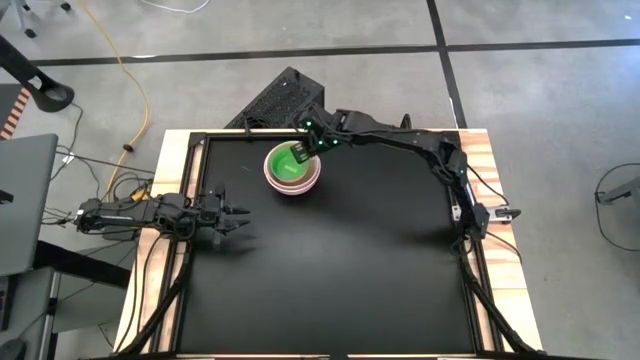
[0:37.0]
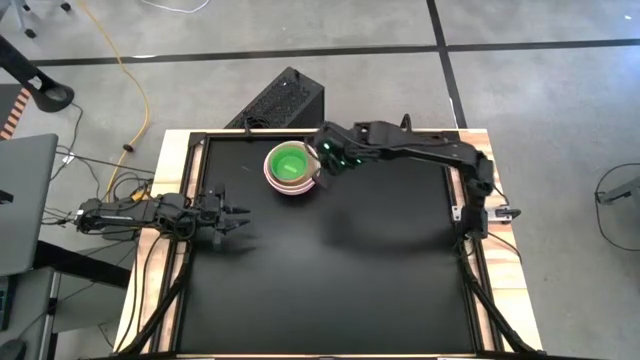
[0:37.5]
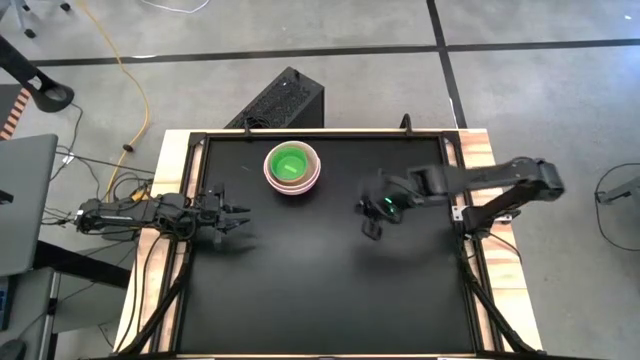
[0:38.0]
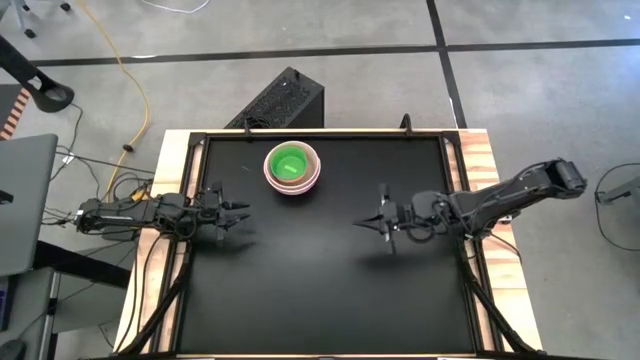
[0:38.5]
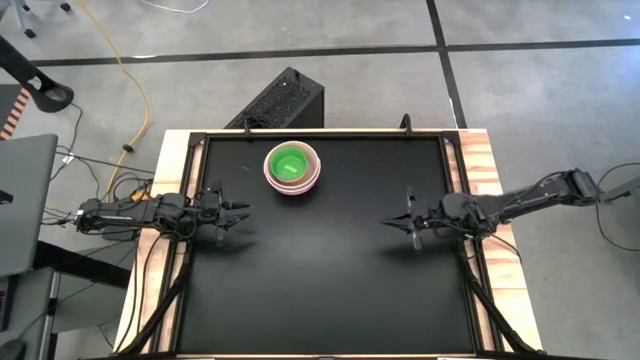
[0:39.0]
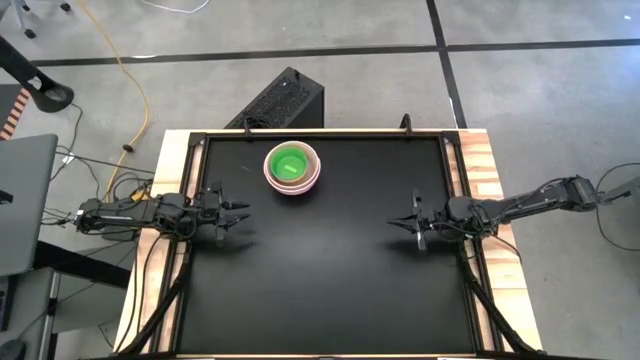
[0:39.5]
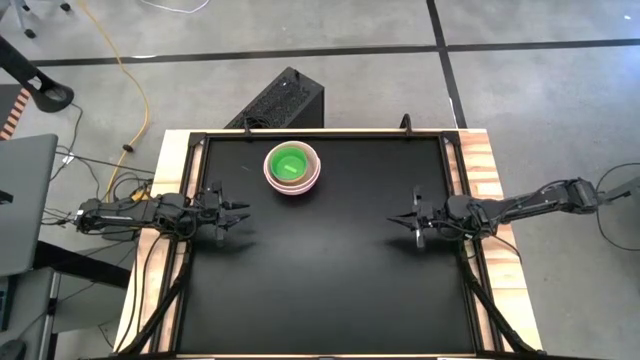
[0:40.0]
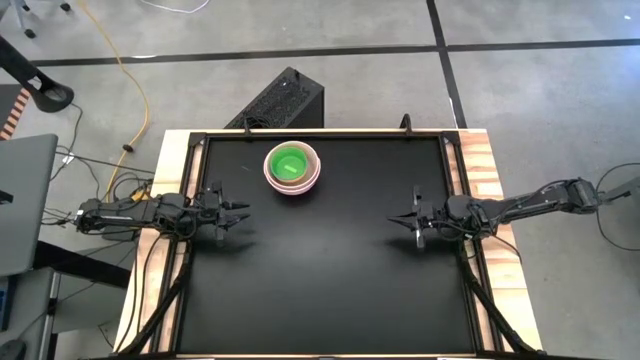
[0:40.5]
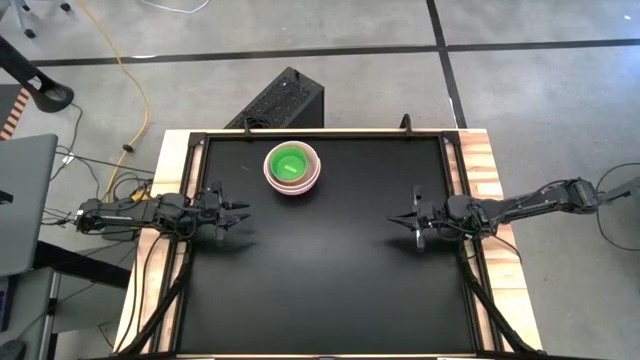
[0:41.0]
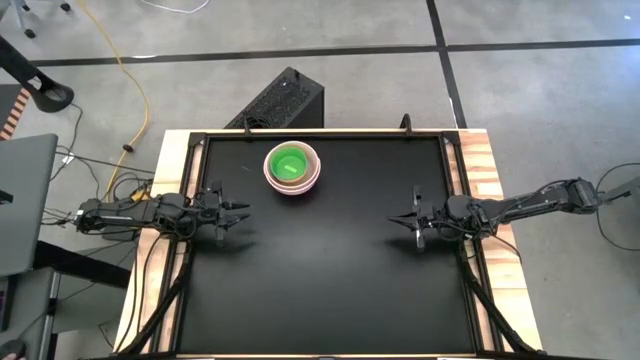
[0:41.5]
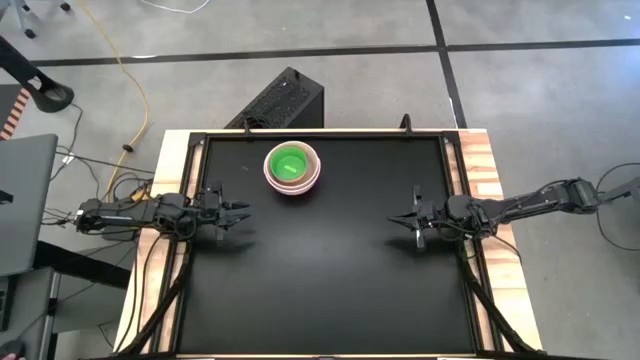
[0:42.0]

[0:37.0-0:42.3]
Return to Home Position
